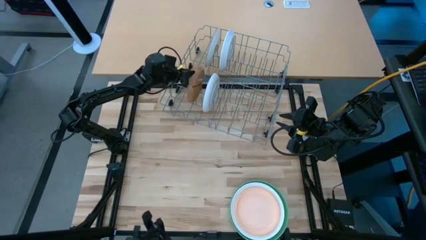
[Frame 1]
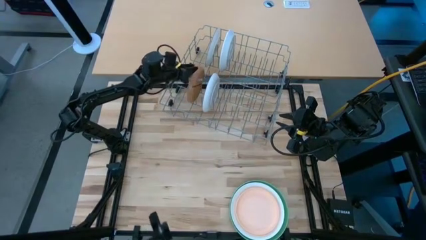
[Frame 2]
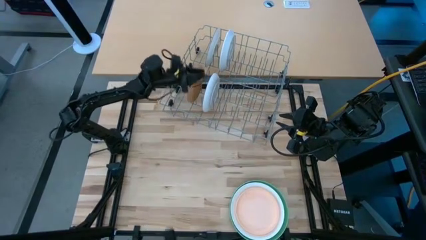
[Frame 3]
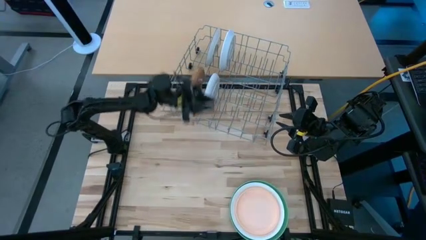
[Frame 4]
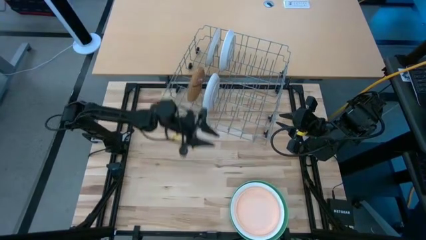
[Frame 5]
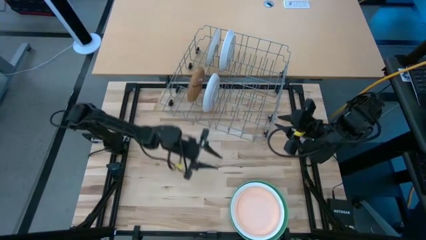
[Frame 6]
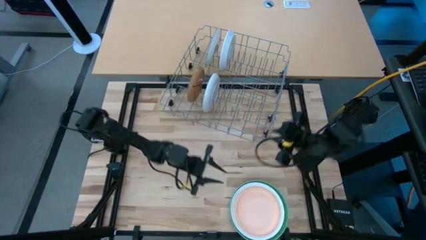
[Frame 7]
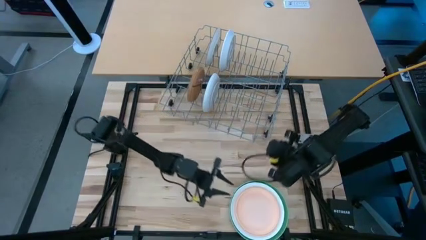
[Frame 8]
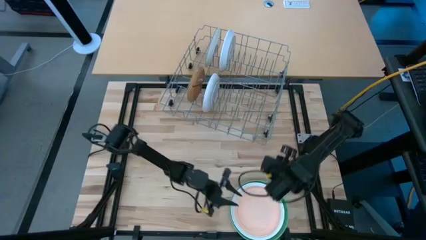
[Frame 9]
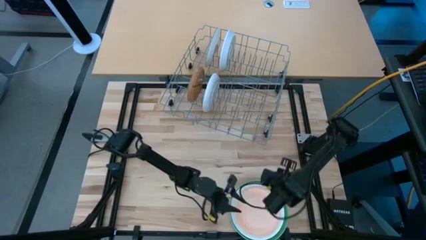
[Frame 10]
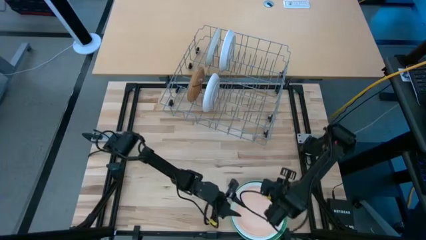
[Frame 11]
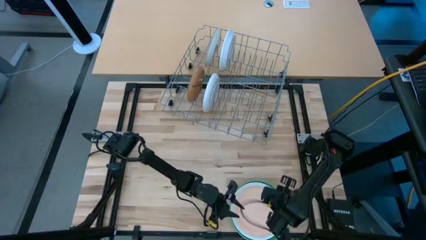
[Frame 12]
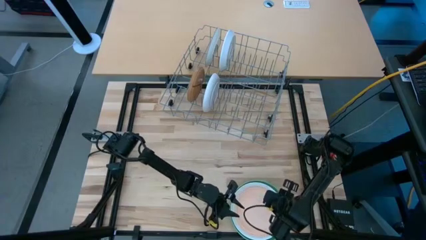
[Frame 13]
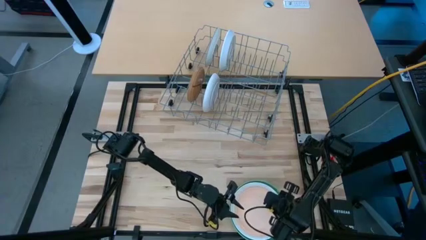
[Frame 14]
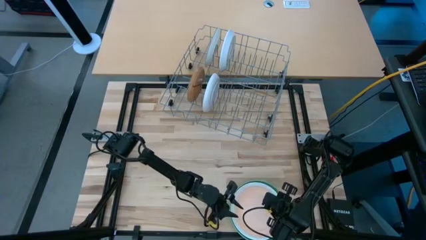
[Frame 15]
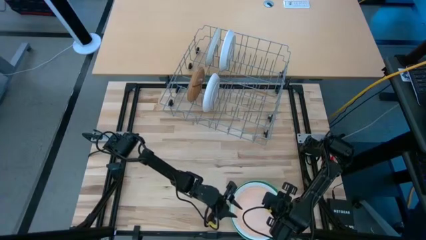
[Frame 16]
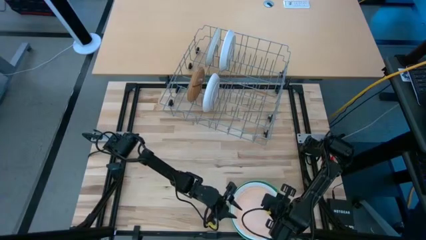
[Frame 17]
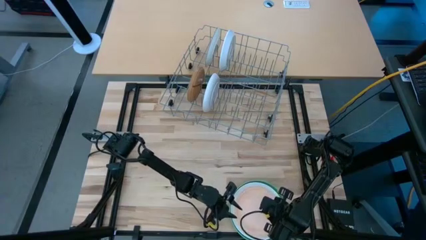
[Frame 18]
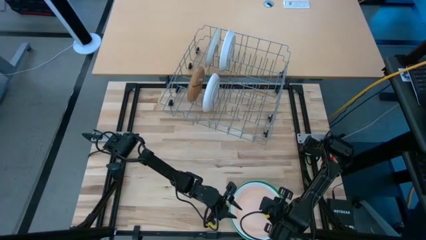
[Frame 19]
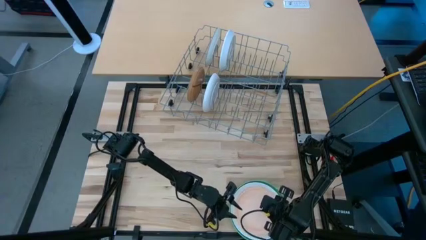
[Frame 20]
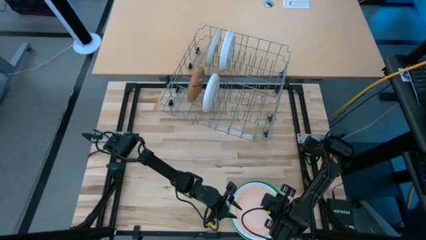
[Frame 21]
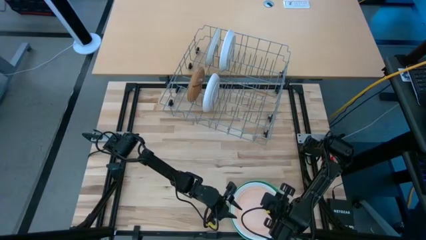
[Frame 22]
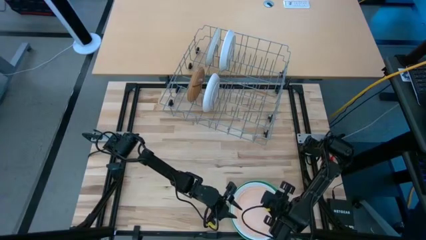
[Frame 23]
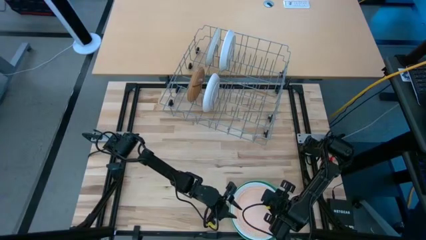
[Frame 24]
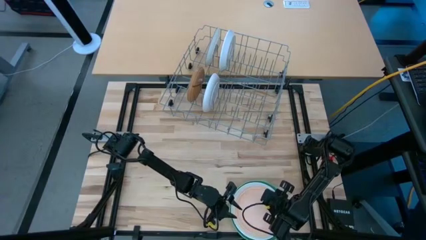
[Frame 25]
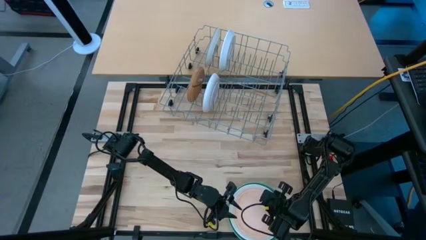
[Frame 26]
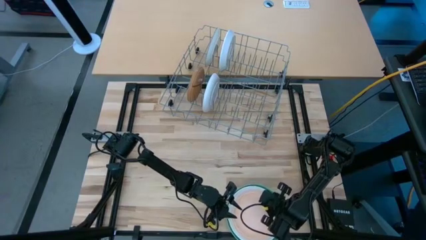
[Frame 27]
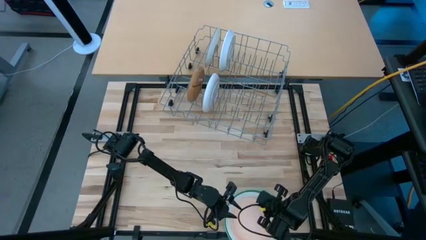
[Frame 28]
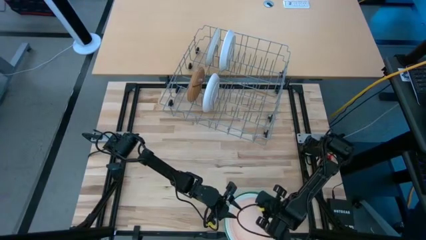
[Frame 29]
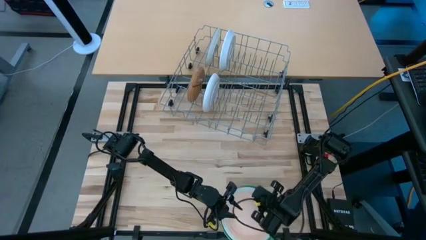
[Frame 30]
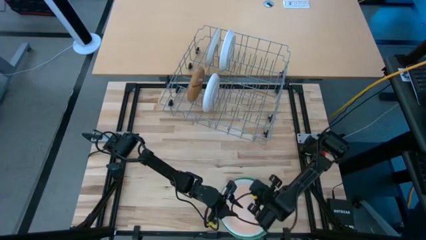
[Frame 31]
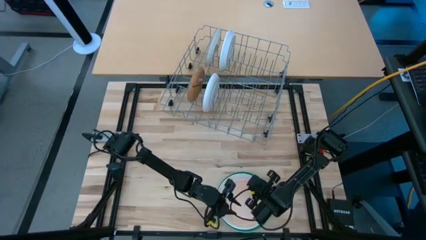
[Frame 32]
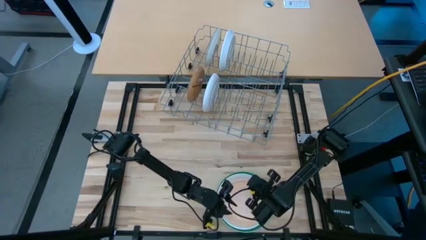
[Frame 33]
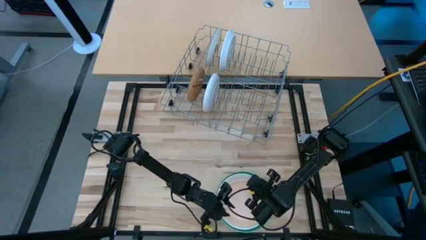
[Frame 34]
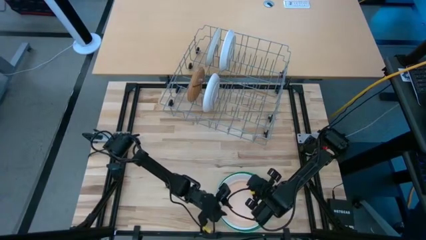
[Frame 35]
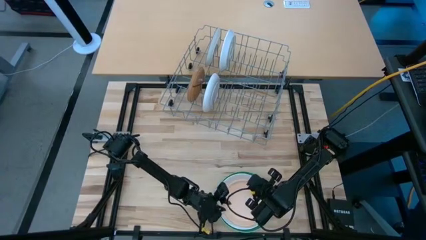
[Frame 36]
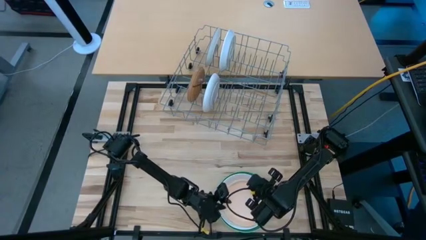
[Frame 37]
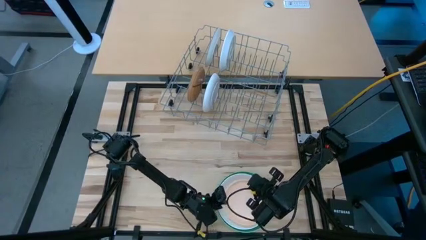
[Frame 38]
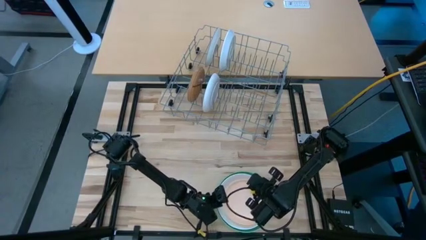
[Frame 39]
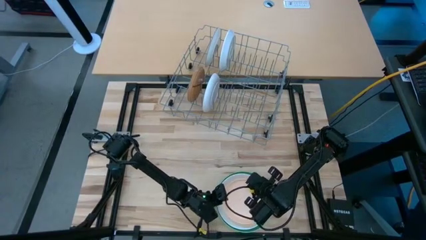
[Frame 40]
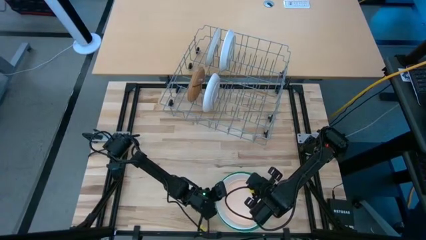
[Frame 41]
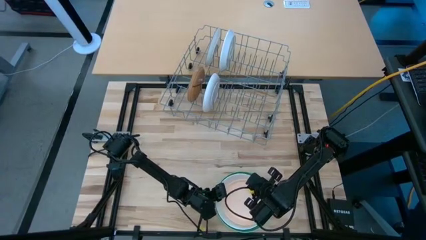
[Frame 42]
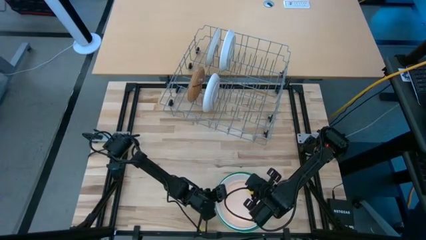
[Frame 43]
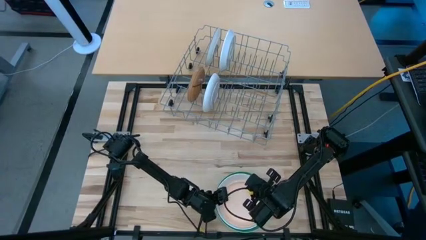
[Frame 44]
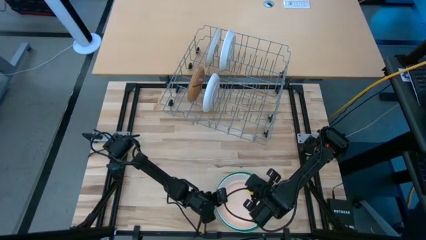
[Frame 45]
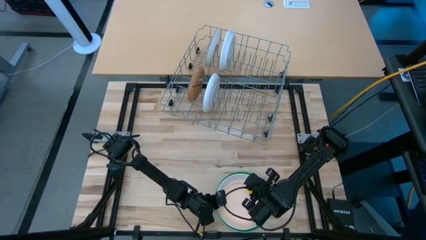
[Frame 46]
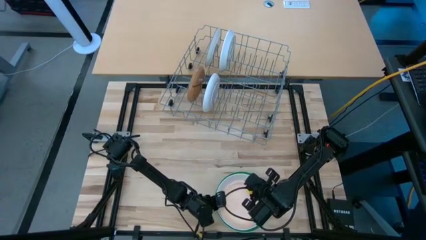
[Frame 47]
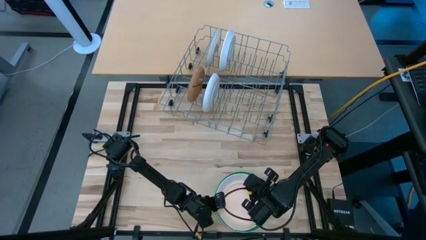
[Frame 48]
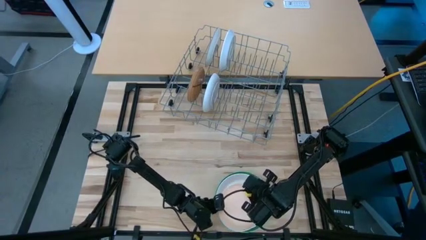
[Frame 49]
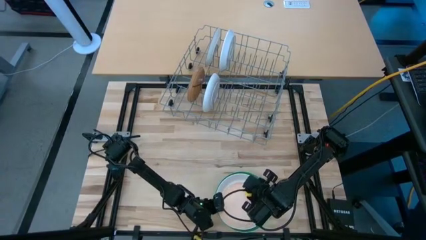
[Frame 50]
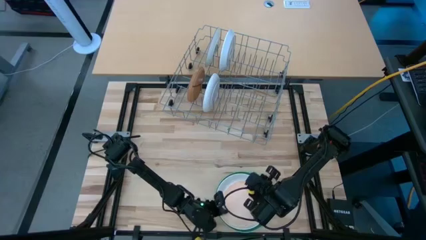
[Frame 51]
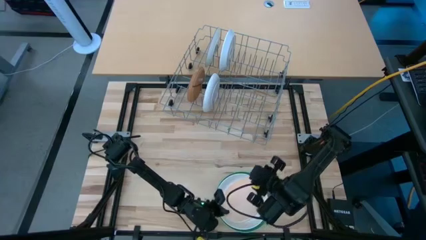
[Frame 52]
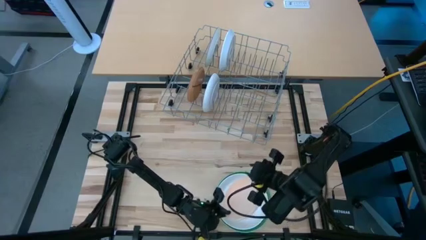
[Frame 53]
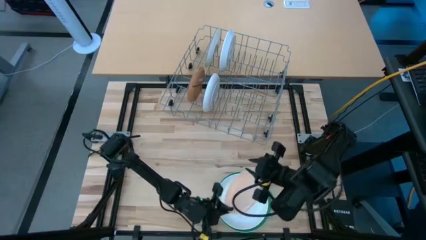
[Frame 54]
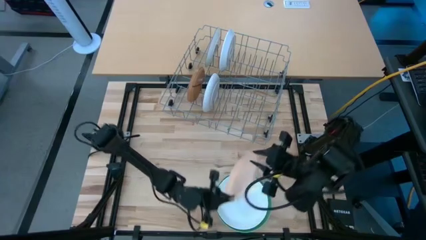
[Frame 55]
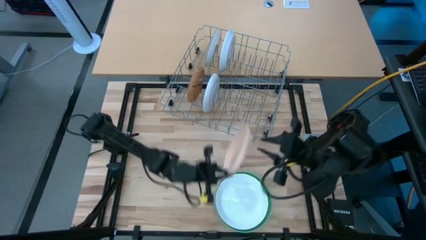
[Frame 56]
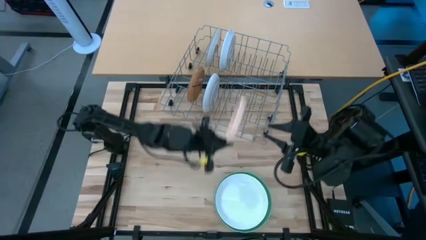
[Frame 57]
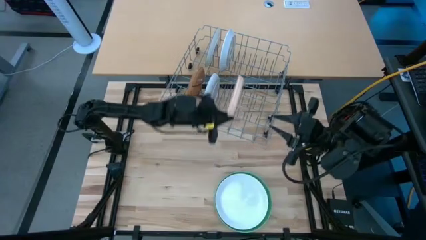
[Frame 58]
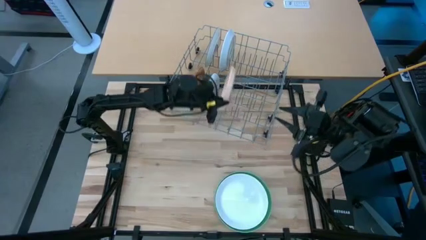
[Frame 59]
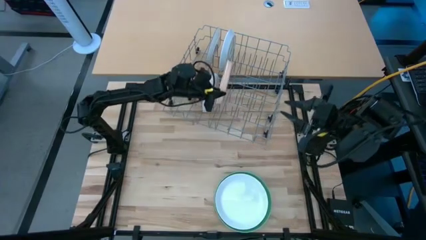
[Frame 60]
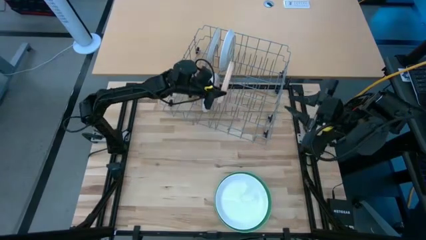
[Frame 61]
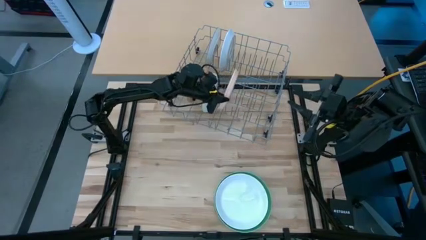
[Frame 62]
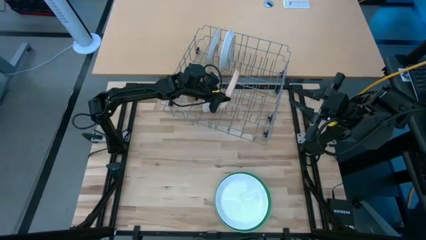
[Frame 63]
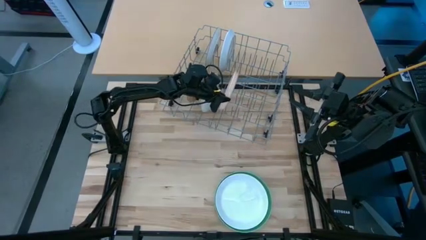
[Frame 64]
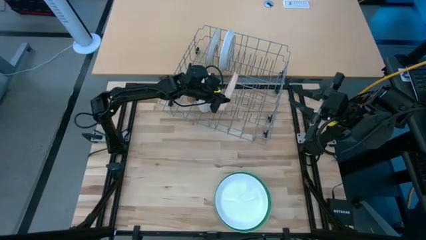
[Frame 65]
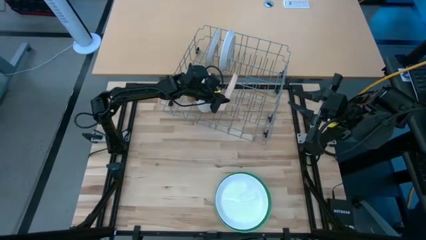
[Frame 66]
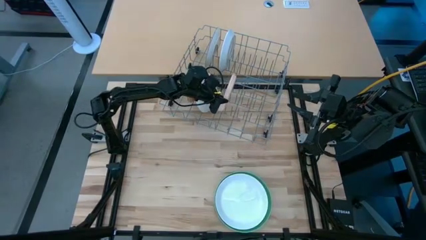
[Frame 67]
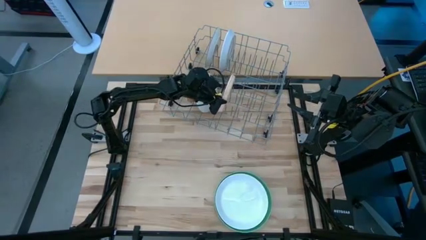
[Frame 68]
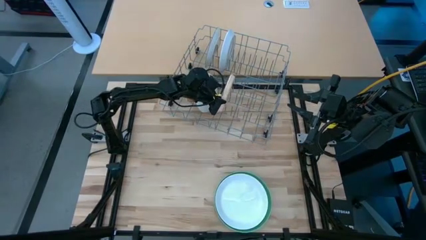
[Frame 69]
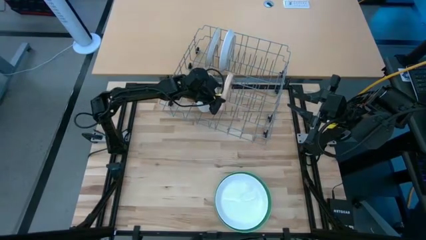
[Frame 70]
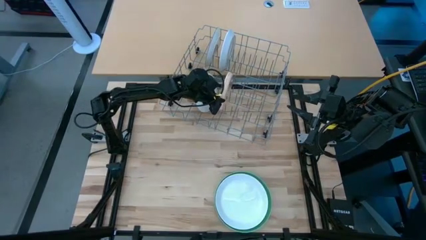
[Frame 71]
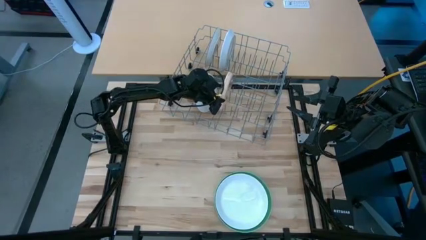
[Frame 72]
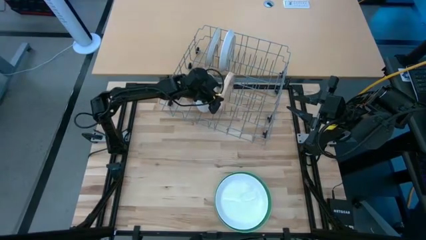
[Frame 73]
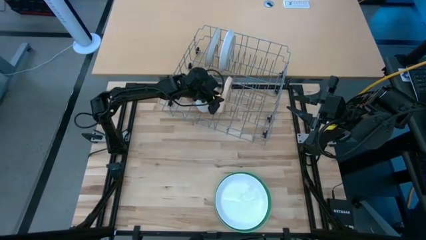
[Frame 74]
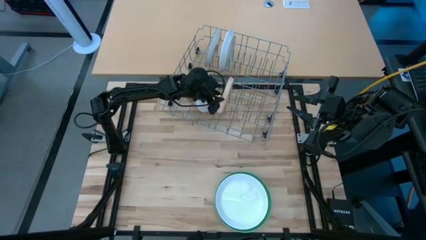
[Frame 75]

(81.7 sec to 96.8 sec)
Task: Sort dishes
Put the light orange plate into the gray dishwasher rack

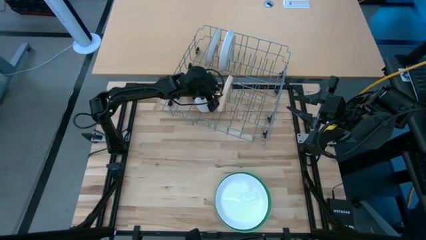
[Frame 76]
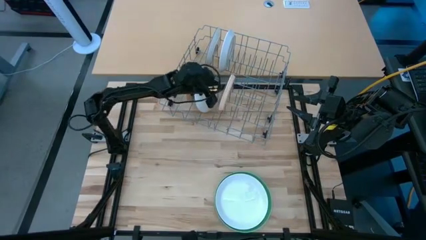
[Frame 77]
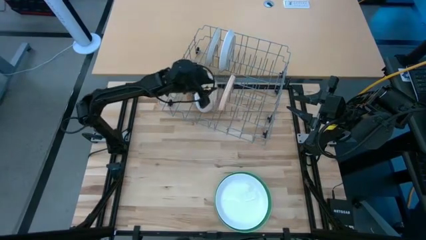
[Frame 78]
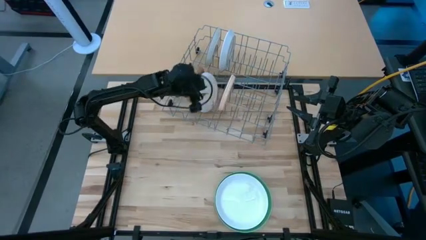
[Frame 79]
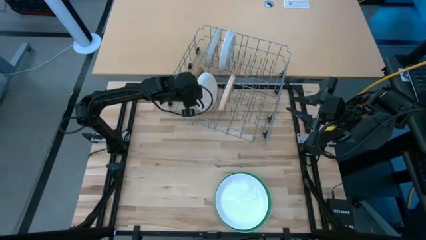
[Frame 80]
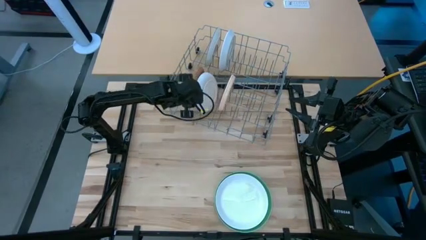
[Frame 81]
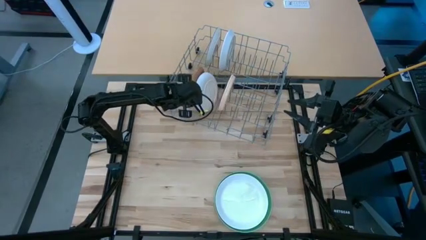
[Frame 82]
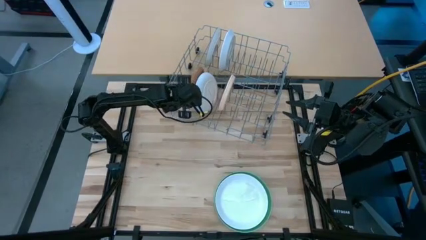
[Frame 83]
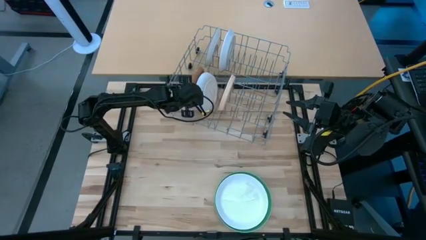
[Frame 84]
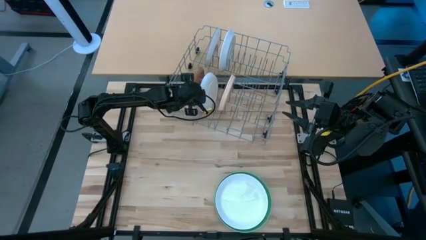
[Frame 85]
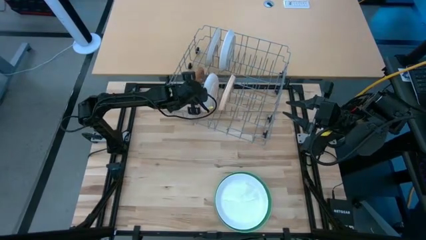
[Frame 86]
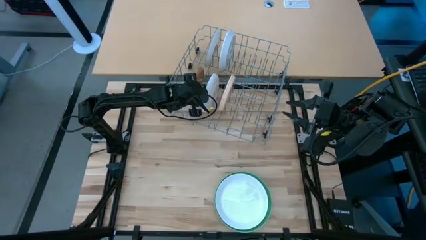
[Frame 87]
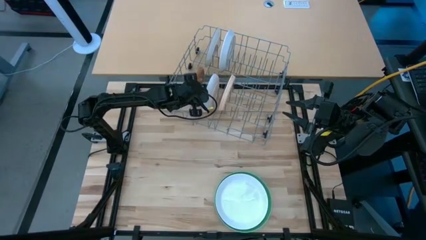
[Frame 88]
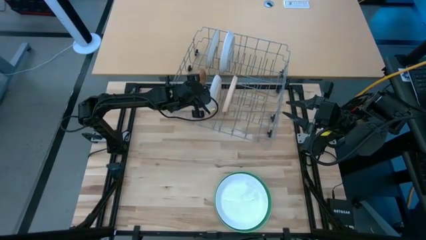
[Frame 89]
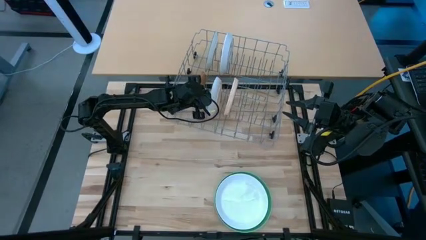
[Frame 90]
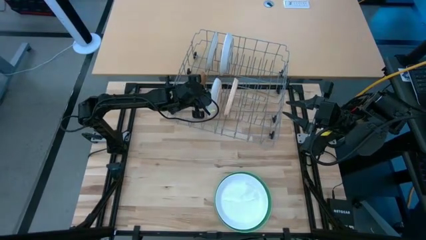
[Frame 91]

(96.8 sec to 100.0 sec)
Adjust the bottom white plate in the dishwasher rack
